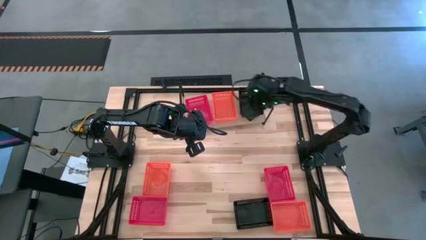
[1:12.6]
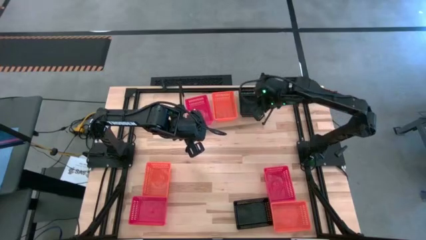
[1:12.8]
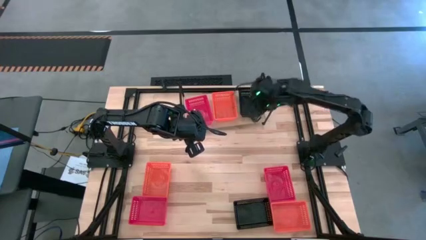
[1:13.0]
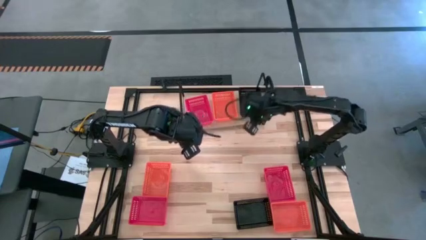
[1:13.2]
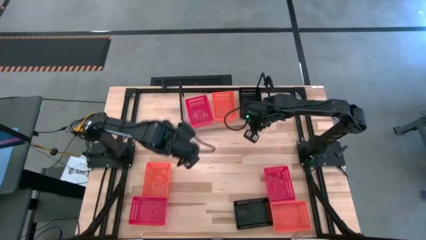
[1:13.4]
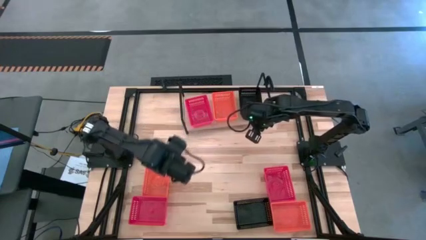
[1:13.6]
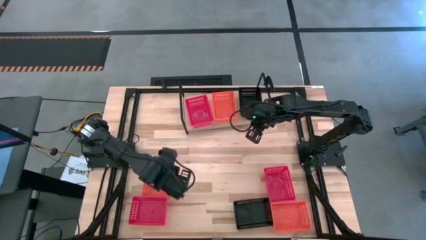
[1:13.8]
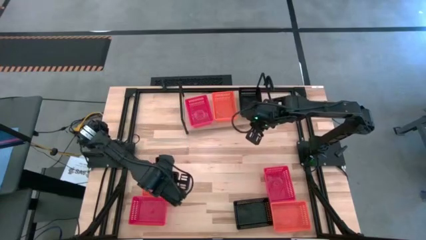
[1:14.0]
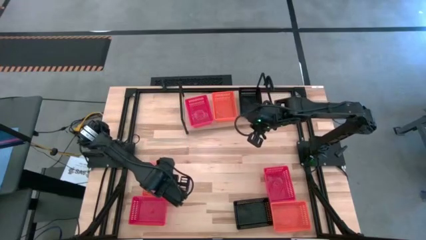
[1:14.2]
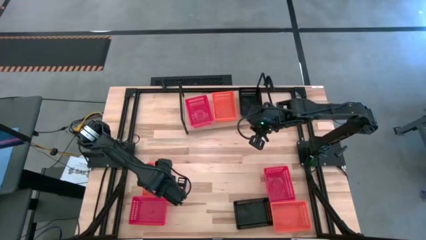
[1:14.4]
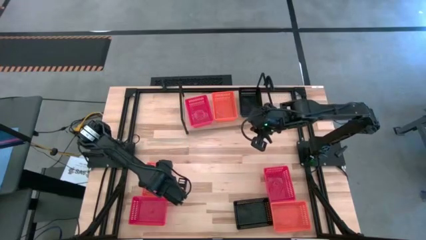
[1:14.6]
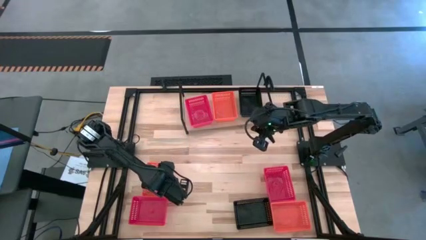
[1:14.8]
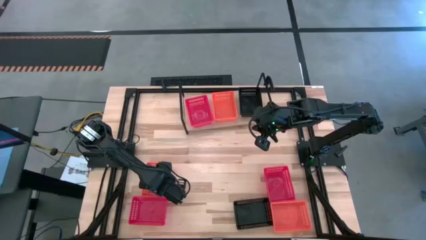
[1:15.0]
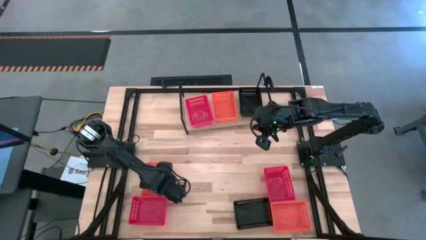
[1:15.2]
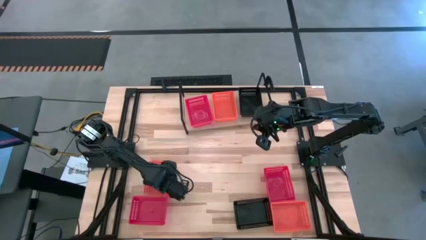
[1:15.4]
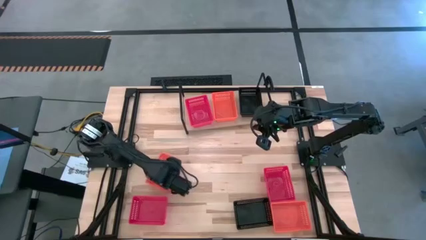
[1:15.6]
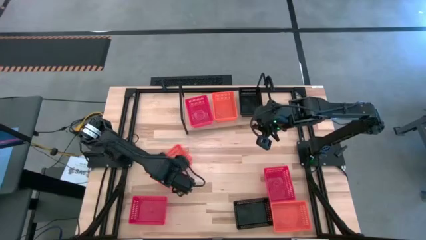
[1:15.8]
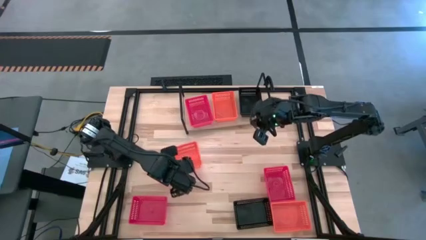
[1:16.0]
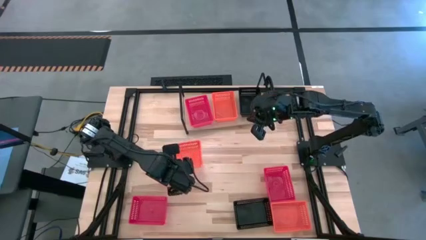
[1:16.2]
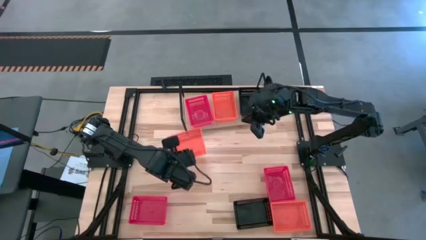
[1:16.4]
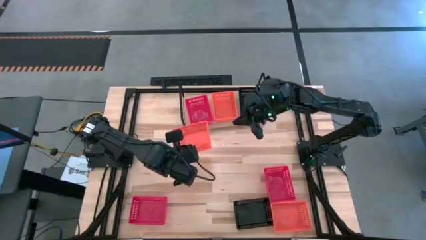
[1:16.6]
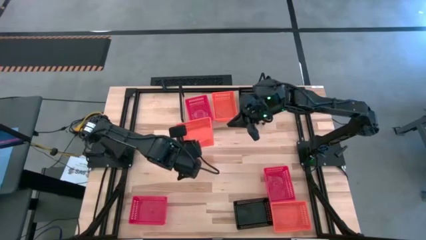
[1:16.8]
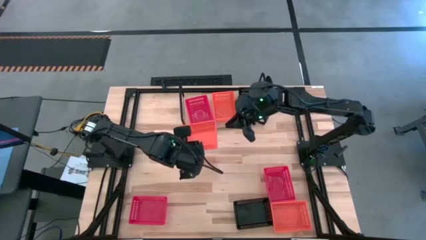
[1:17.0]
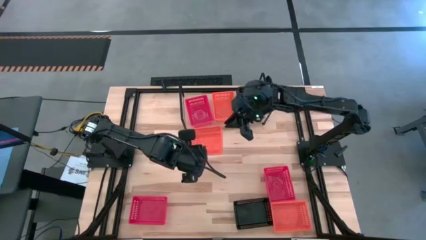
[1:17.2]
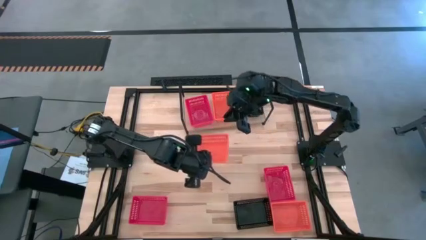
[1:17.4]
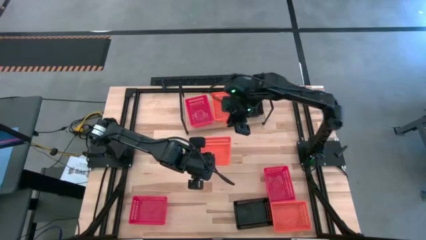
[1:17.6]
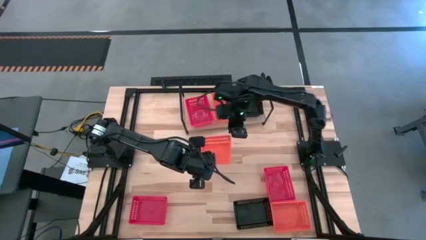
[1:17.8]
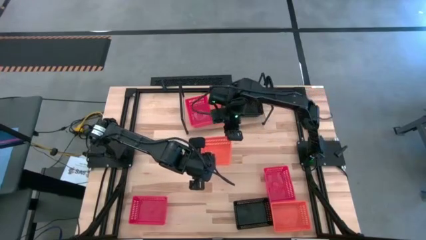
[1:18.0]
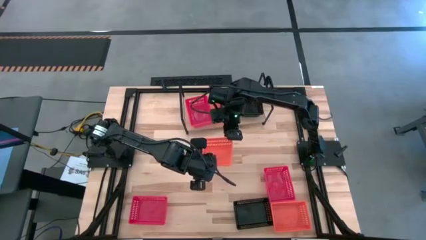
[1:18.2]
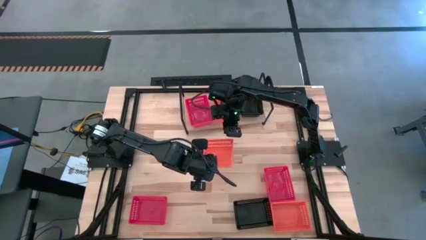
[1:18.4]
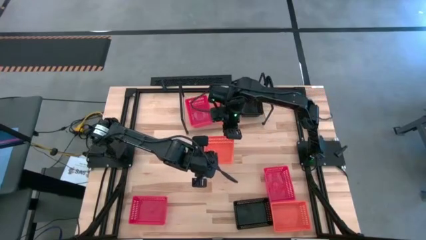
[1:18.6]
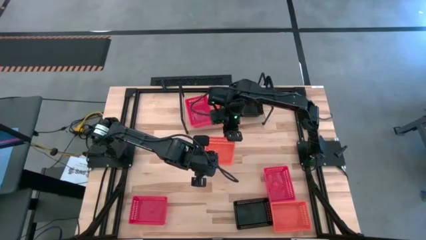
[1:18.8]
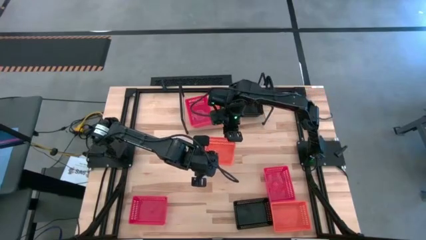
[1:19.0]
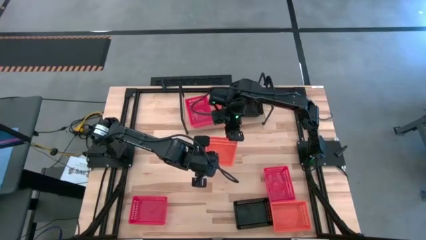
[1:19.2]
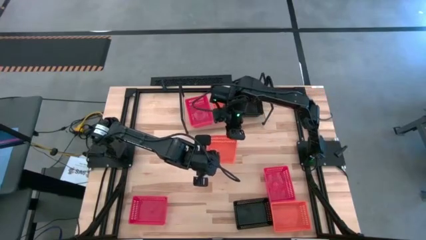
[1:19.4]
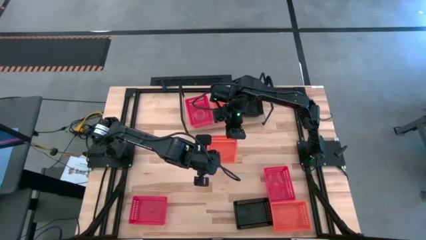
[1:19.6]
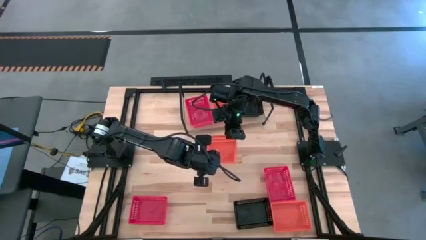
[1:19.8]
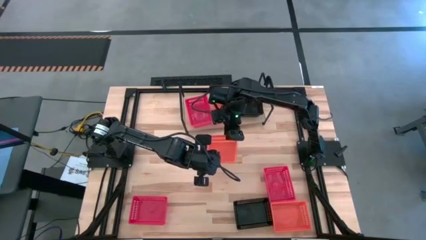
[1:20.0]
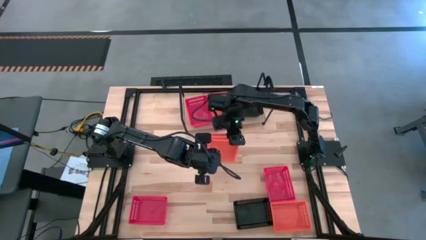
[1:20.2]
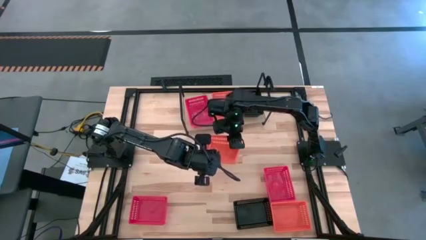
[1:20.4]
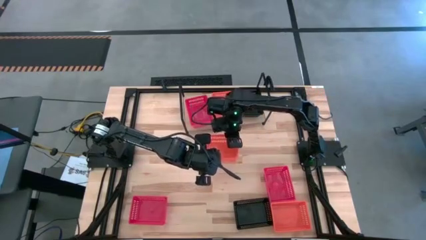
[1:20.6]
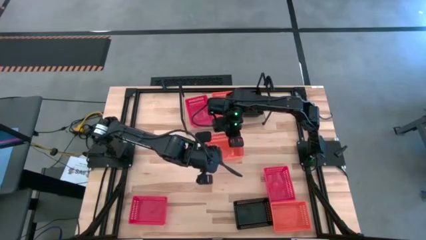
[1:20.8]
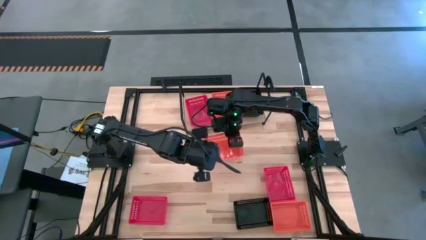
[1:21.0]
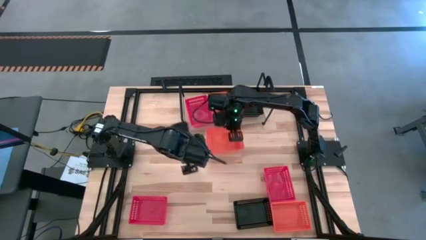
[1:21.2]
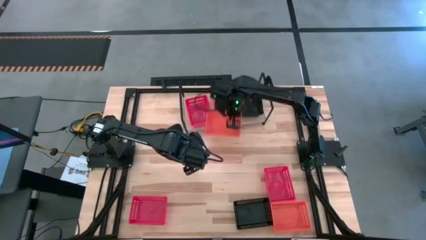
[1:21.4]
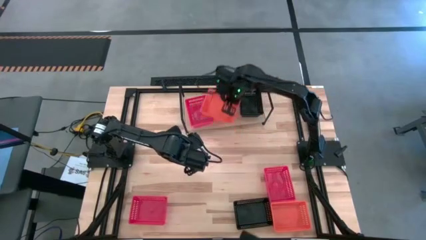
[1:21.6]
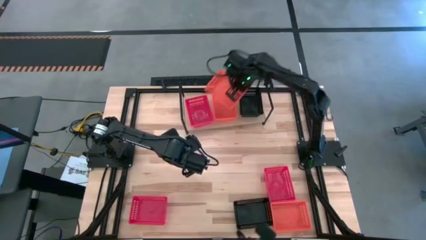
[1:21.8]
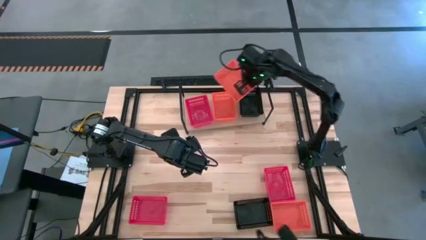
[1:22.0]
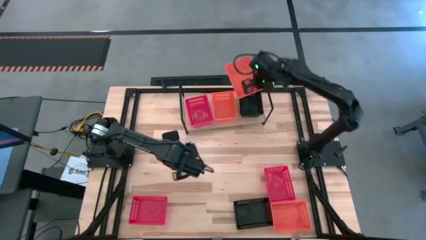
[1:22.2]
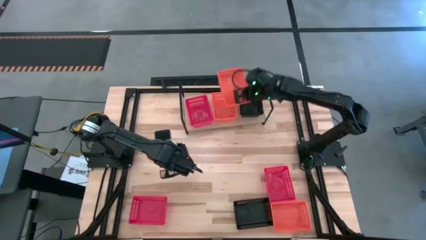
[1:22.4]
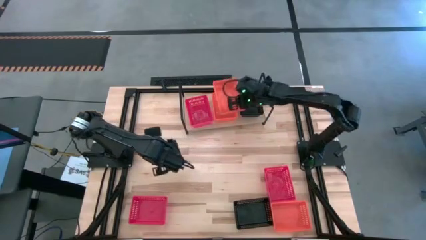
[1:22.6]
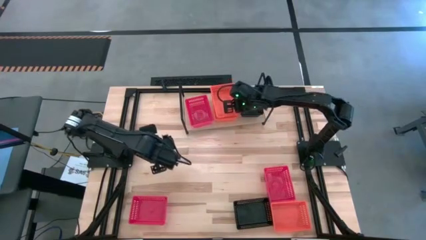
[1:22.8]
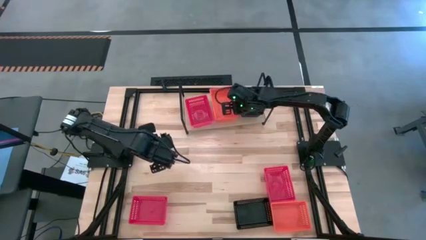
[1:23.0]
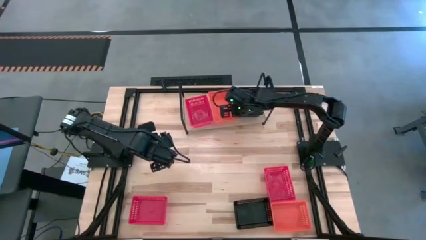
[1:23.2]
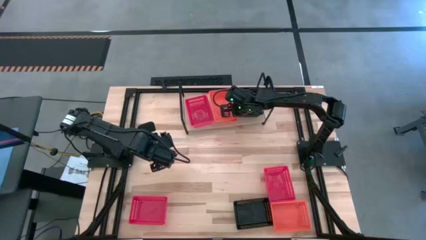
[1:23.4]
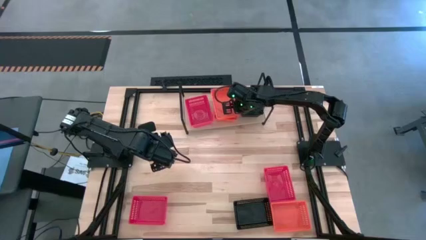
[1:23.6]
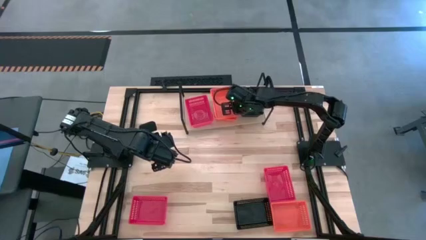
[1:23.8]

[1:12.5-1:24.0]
Task: Stack baskets on shelf by color
Stack the left orange bin into the orange bin on the shelf
